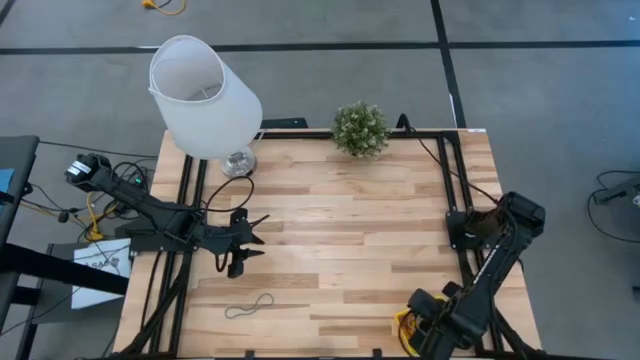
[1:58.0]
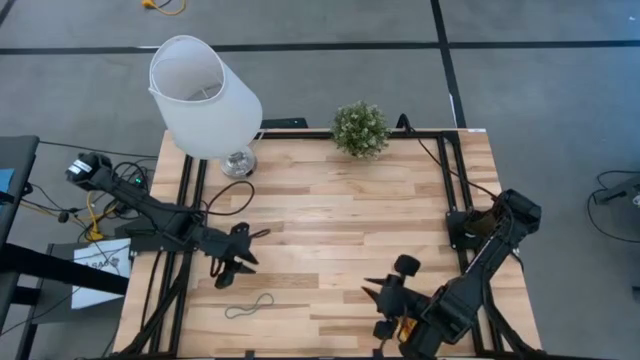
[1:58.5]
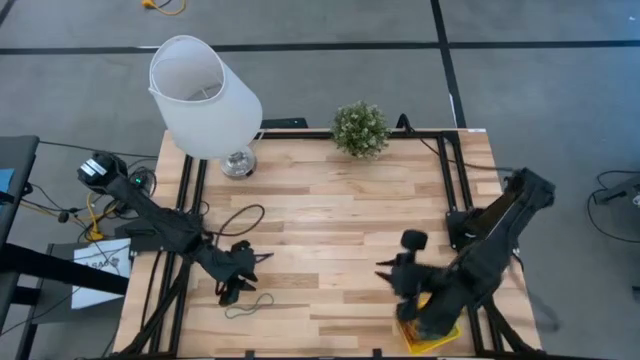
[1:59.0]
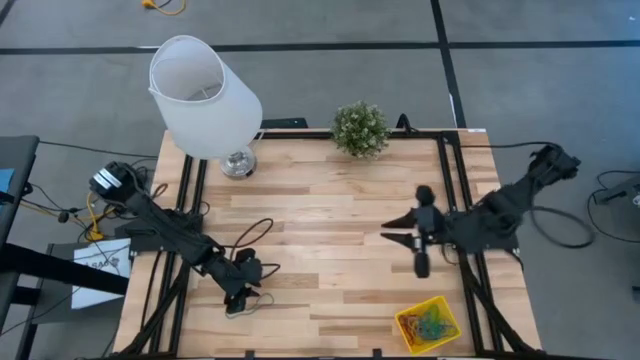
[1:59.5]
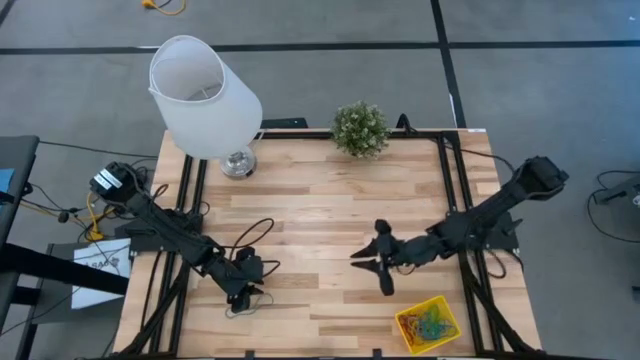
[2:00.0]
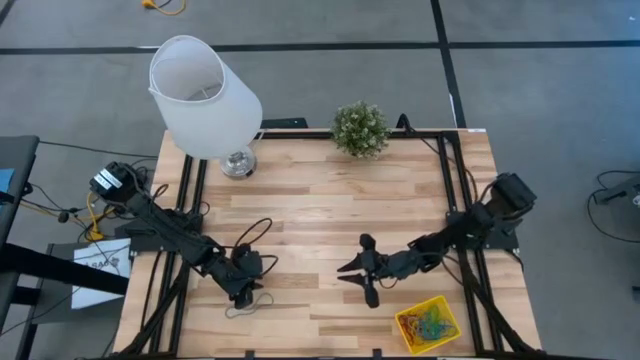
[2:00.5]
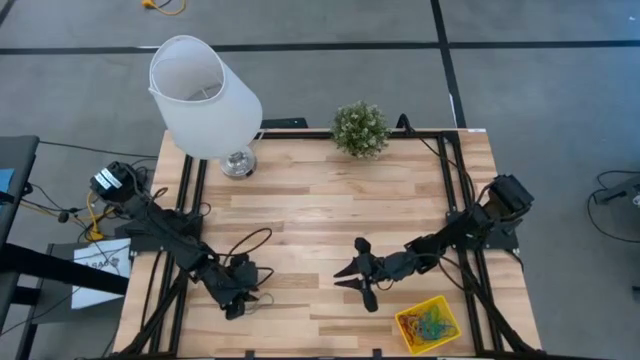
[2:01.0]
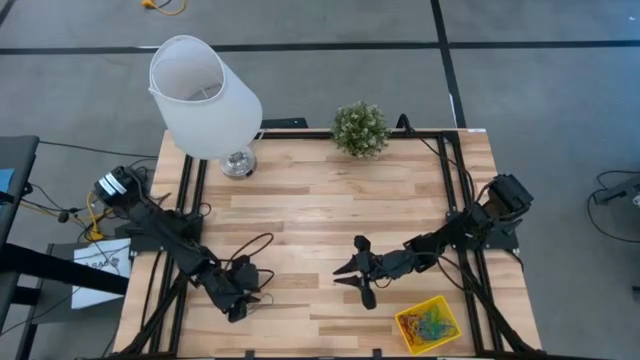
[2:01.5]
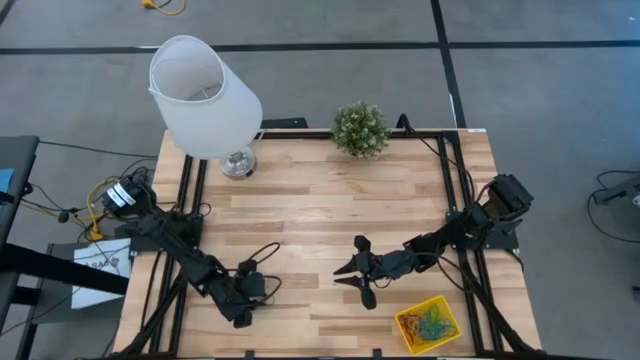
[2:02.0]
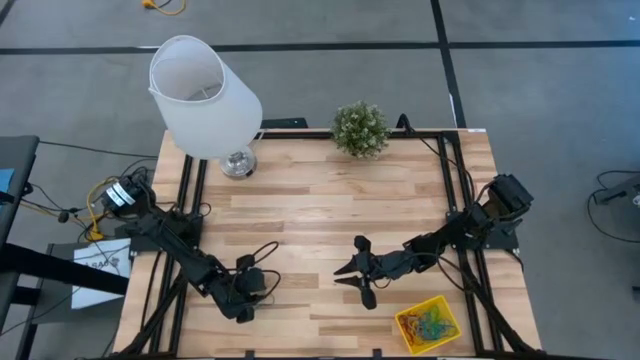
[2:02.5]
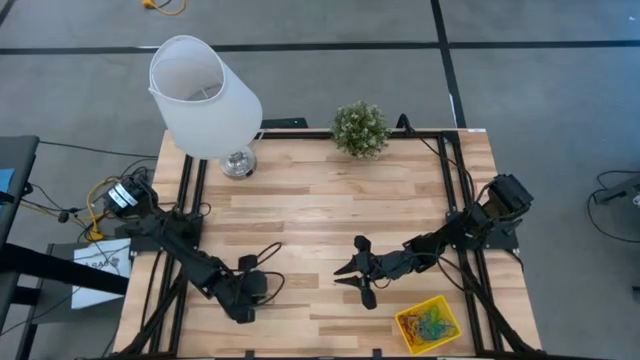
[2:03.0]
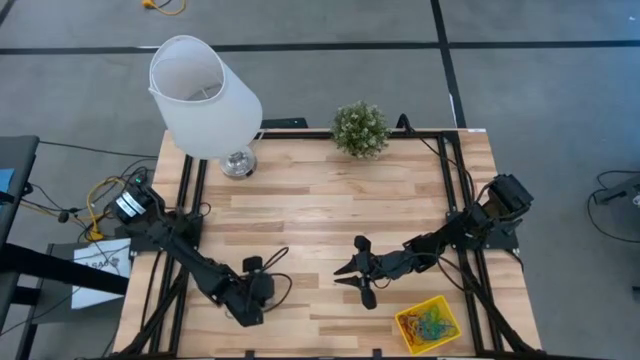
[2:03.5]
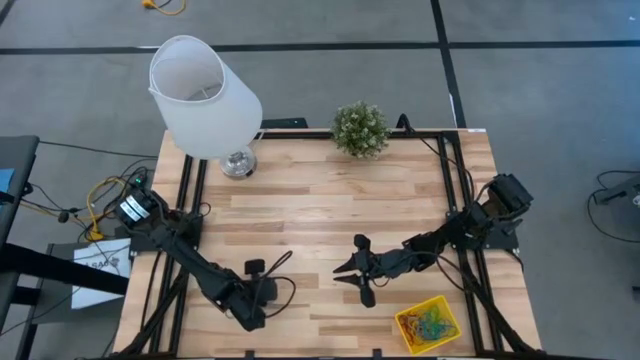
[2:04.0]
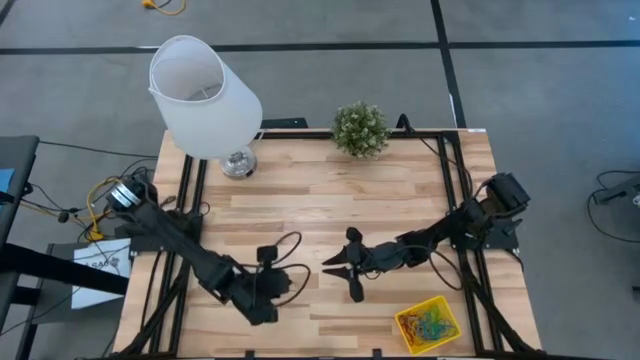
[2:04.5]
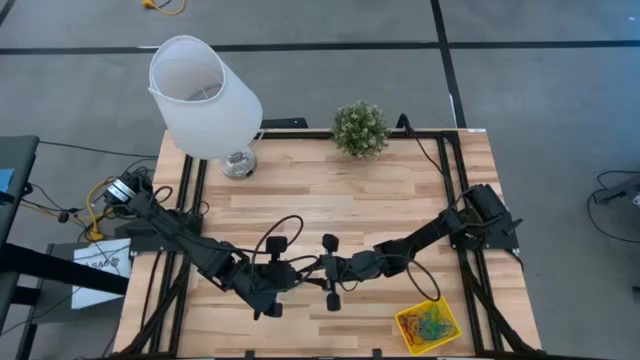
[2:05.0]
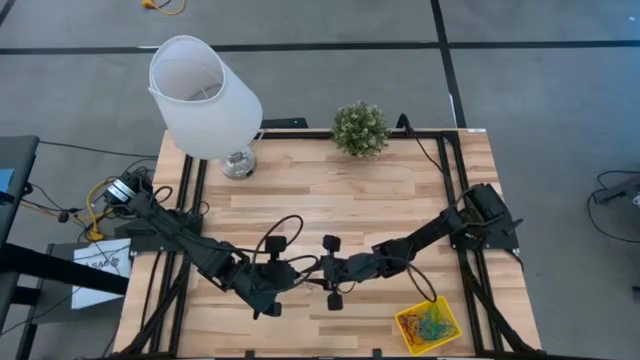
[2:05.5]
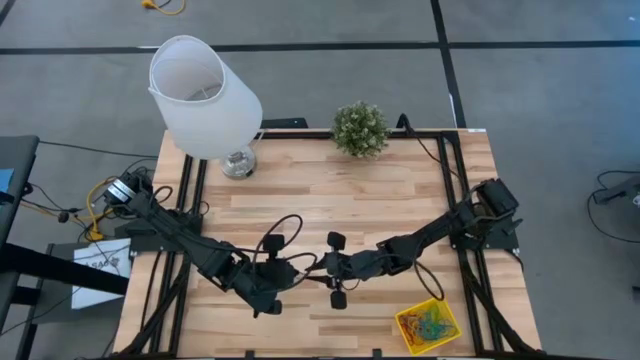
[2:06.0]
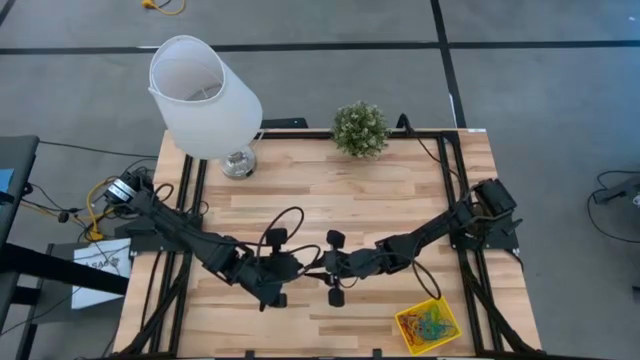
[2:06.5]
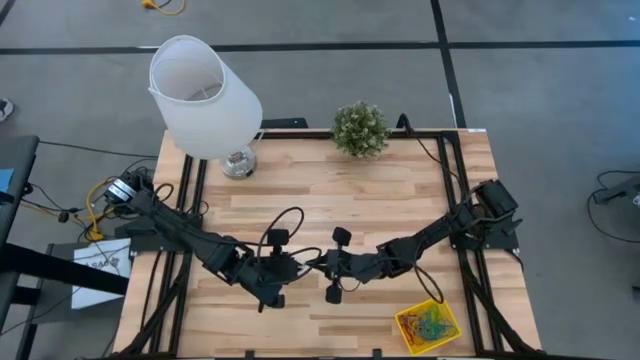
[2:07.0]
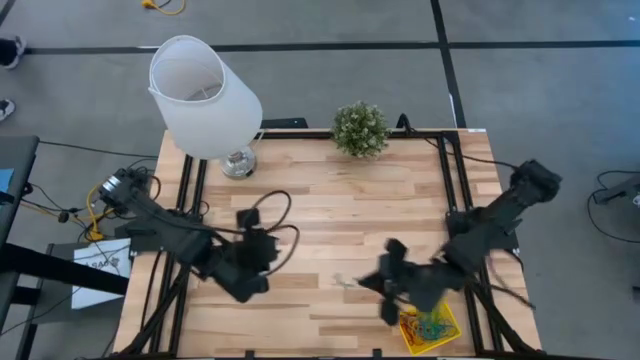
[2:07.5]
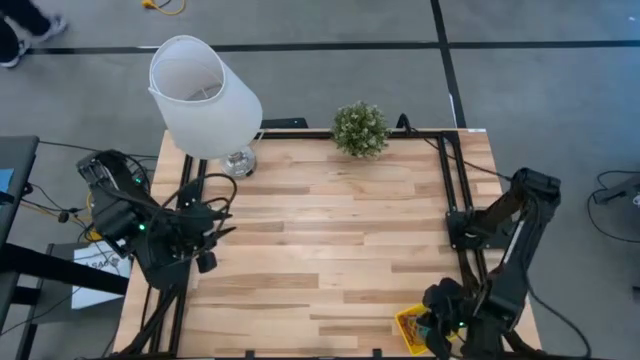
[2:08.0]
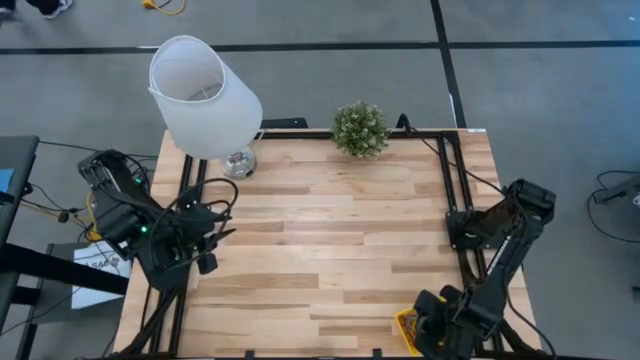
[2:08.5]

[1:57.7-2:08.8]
Task: Pick and place rubber bands into bin
Put the blue rubber band into the yellow basket

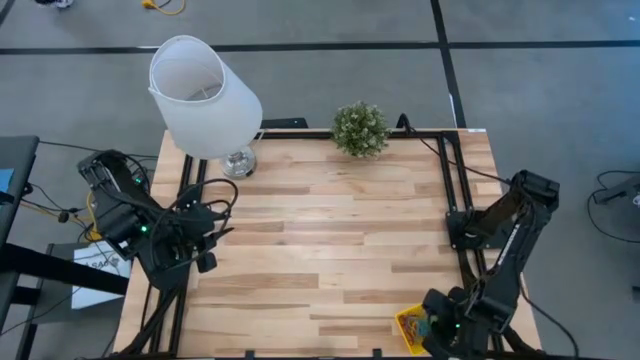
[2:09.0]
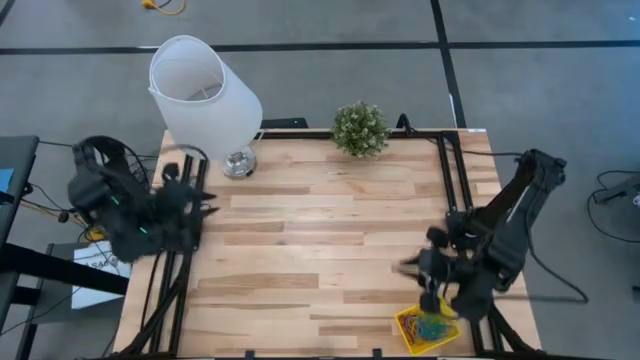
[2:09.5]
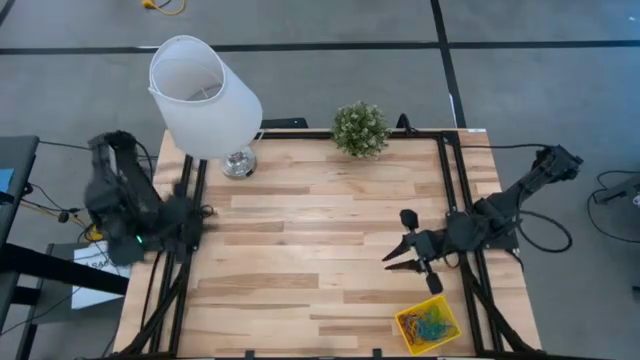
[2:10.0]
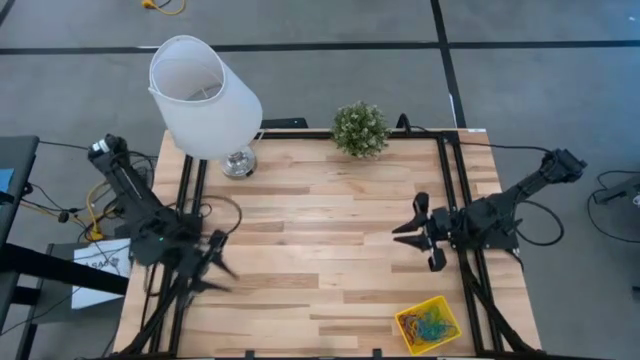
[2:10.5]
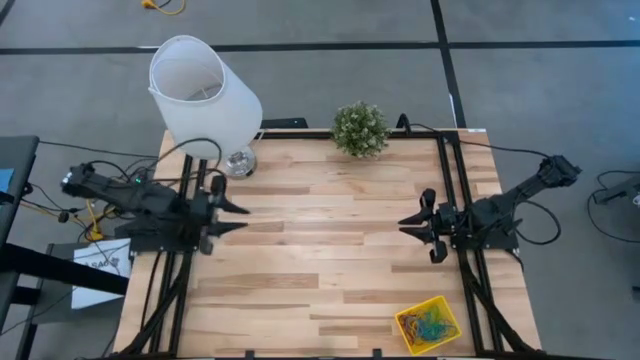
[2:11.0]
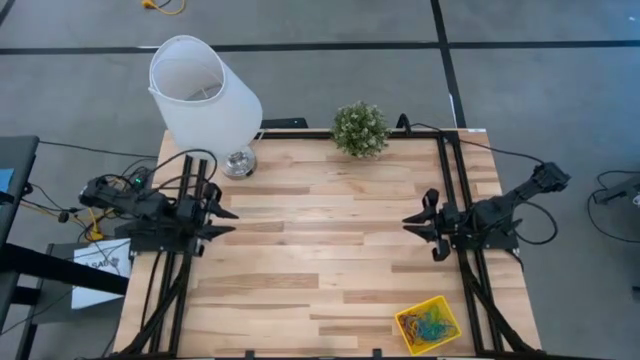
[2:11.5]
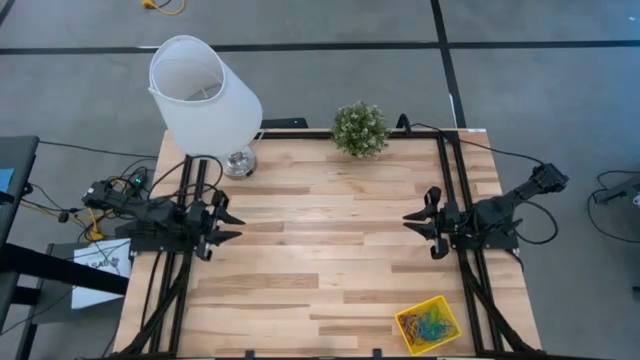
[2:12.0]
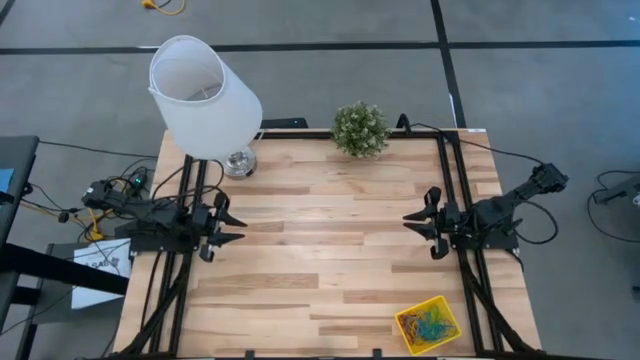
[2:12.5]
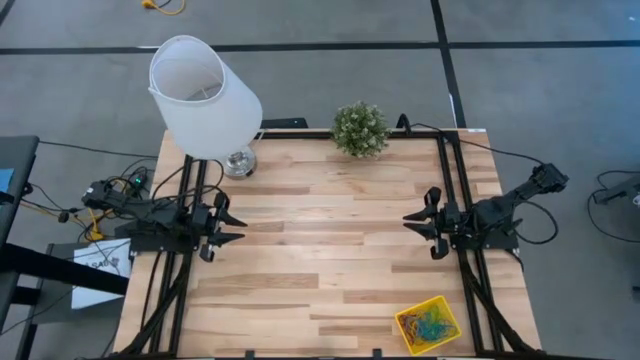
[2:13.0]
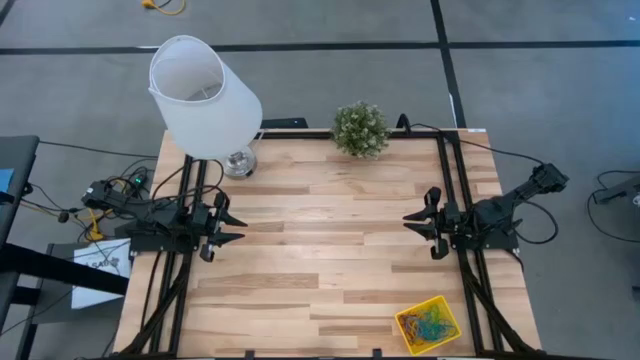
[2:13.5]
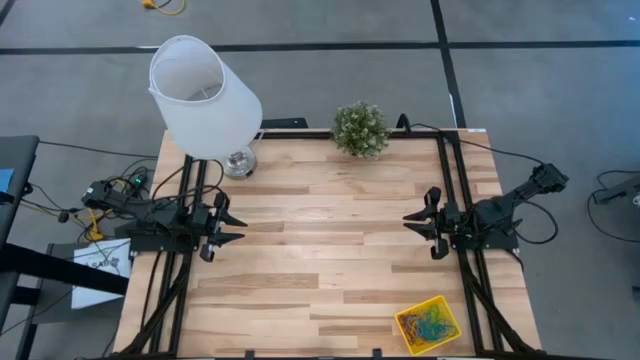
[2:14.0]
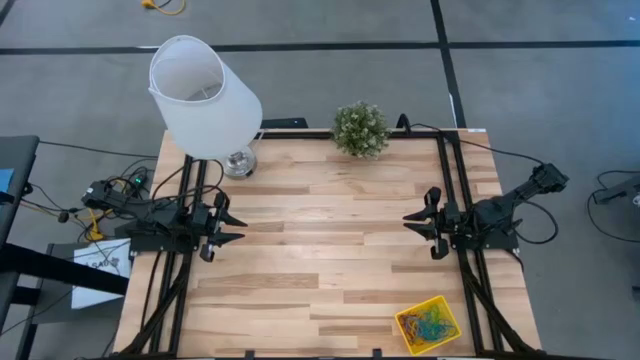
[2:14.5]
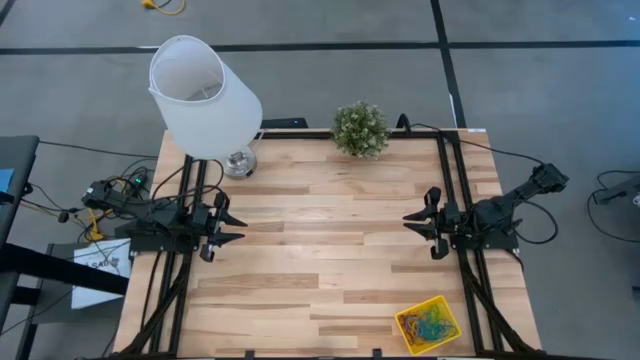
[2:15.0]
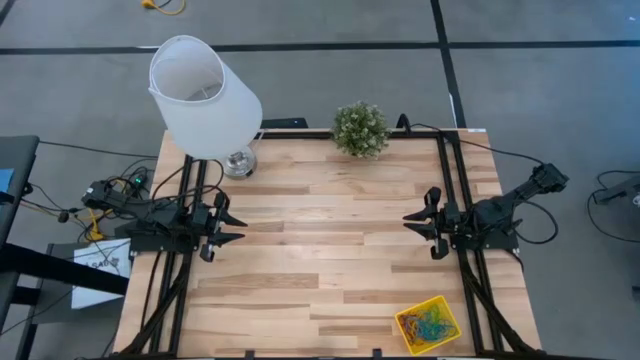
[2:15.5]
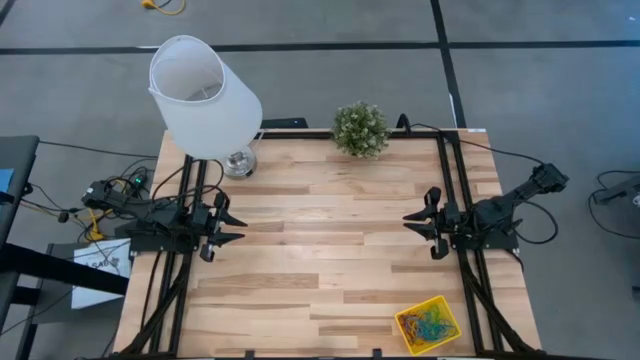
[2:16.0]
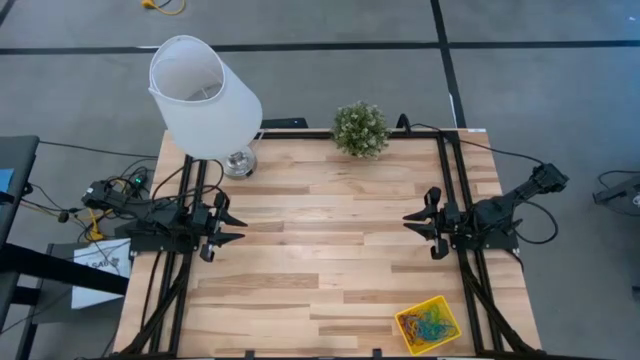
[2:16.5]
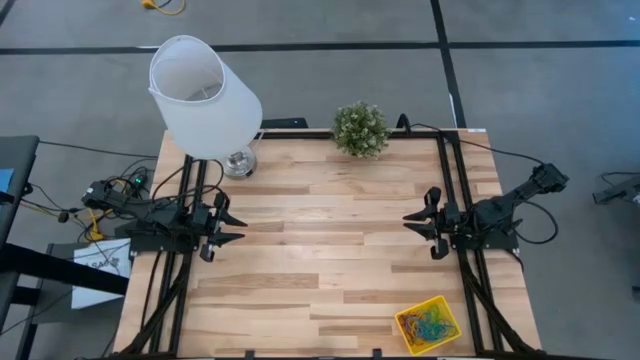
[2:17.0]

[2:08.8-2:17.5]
Return to Home Position

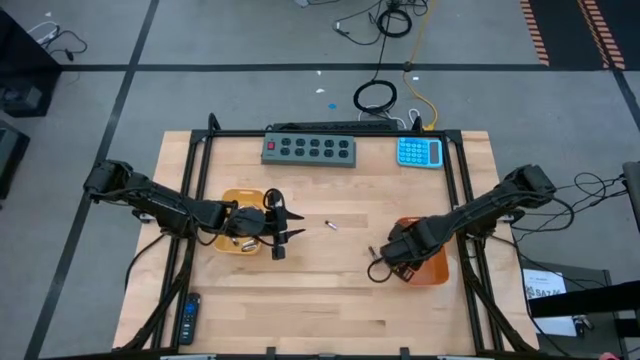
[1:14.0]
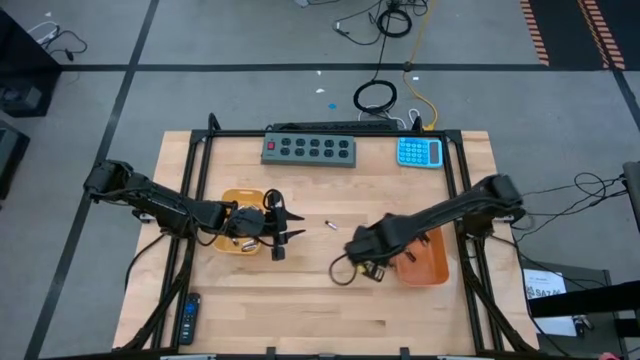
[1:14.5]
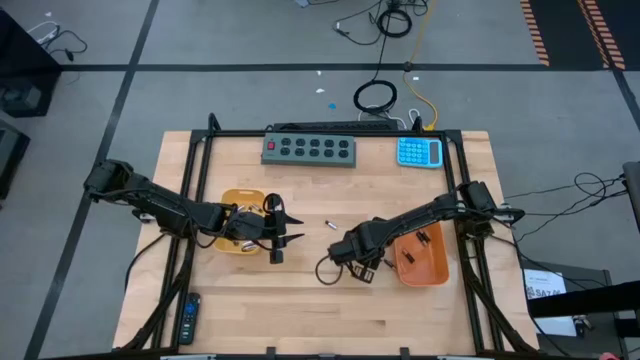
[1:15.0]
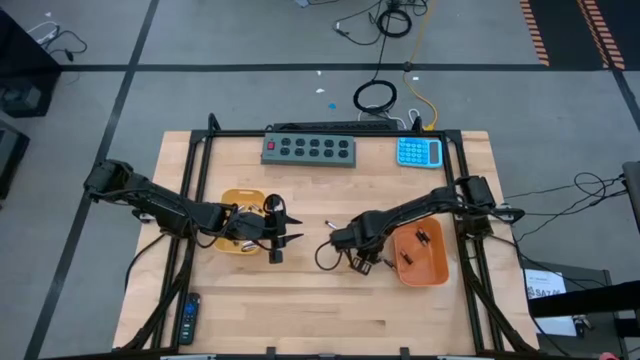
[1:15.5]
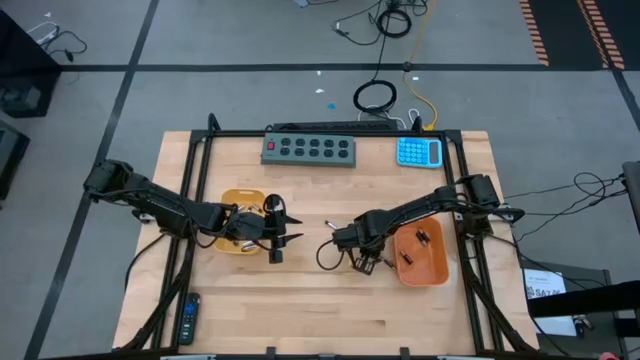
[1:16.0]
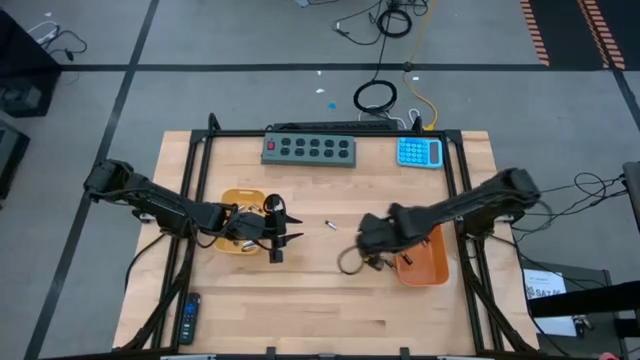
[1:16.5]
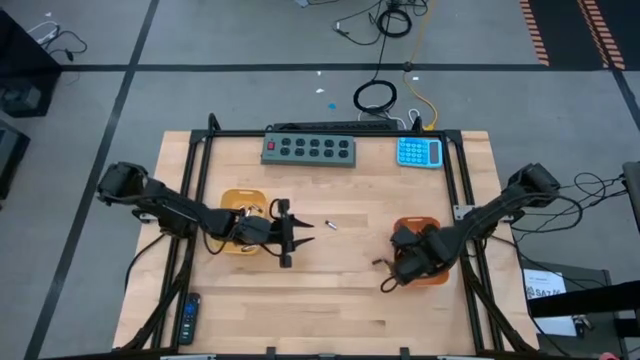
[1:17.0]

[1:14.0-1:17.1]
Task: Sort batteries
Put the black battery into the orange bin
